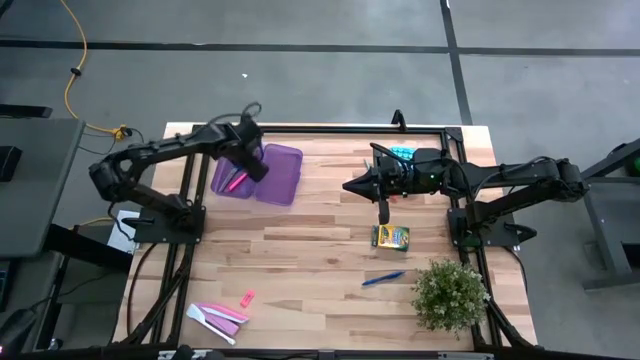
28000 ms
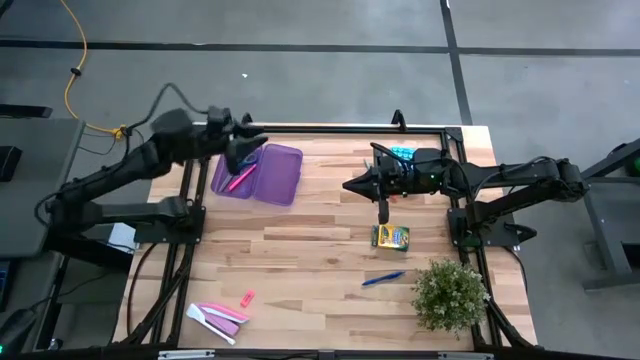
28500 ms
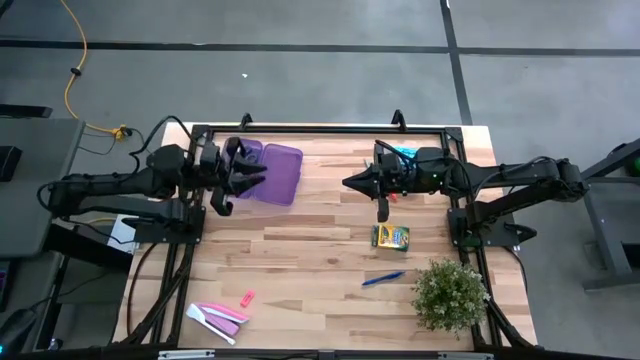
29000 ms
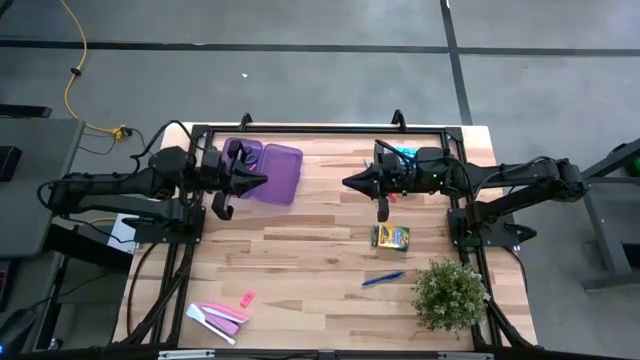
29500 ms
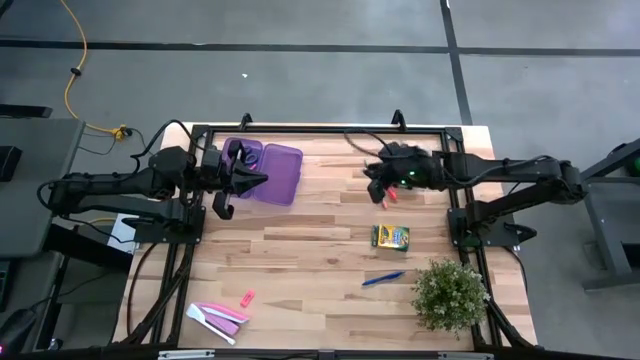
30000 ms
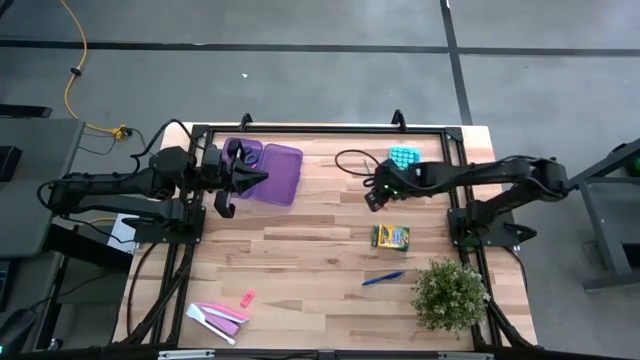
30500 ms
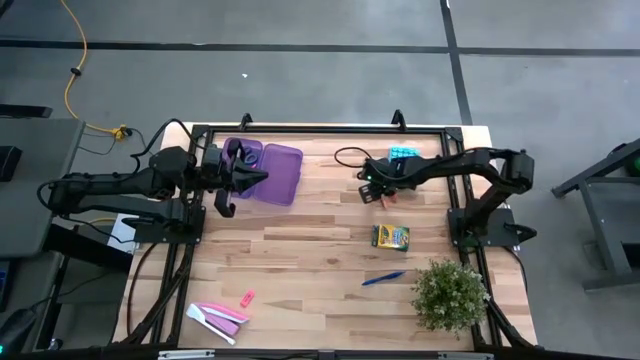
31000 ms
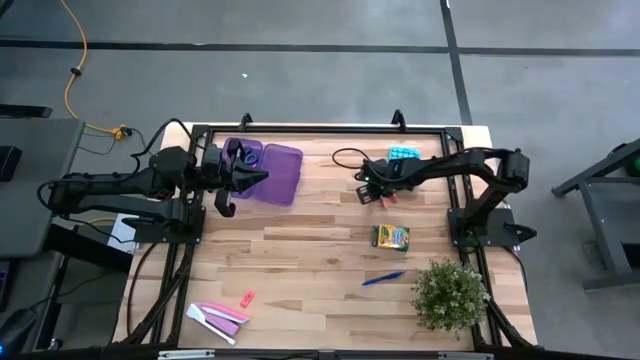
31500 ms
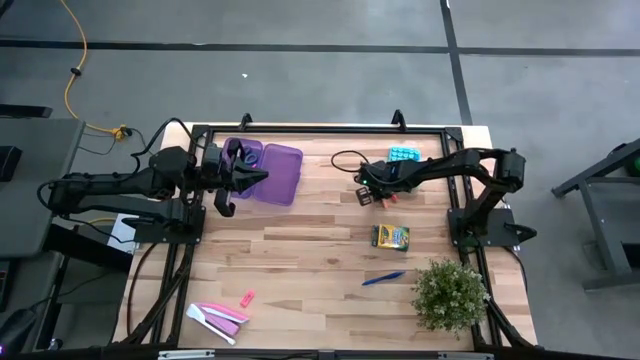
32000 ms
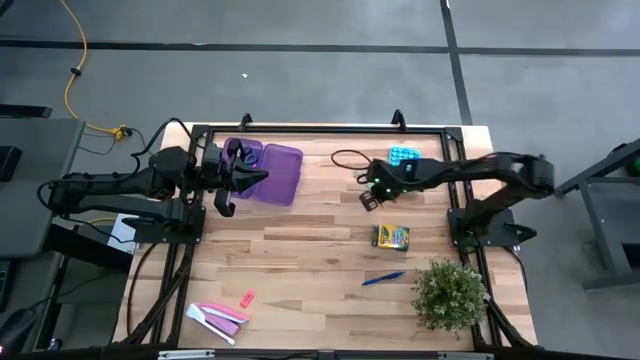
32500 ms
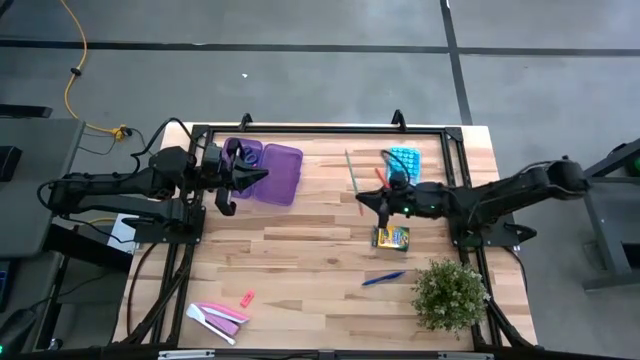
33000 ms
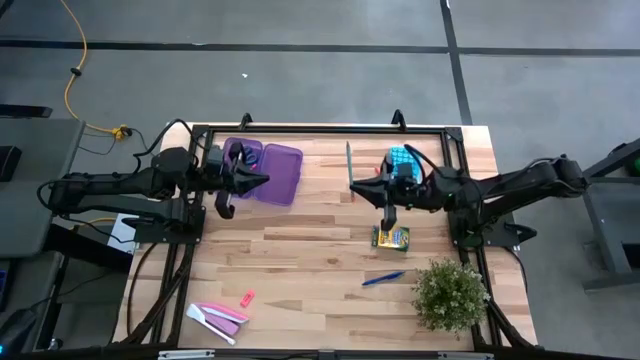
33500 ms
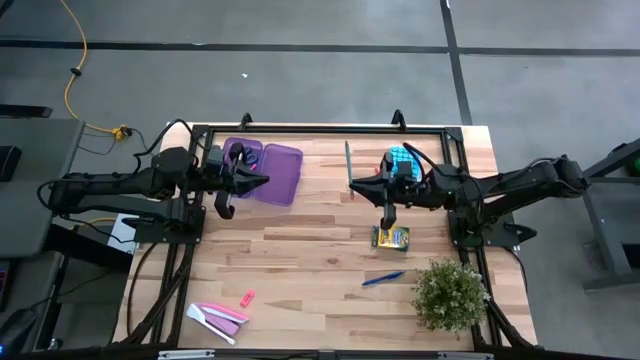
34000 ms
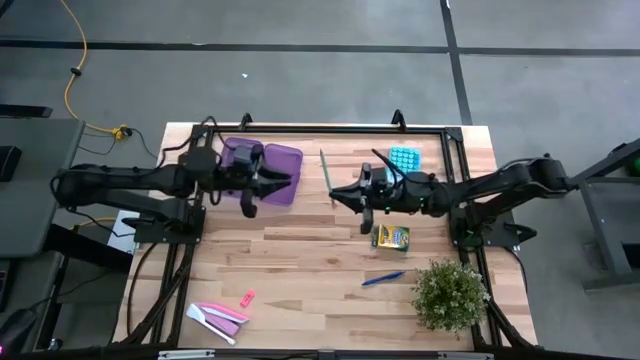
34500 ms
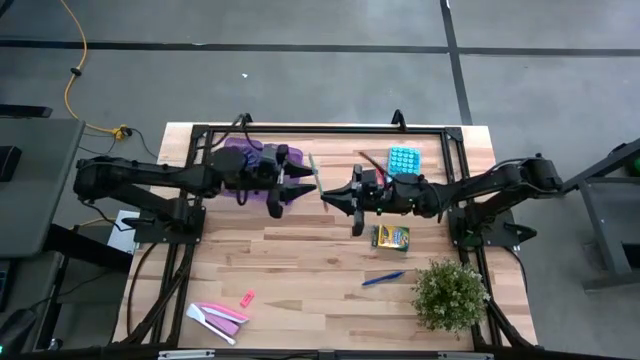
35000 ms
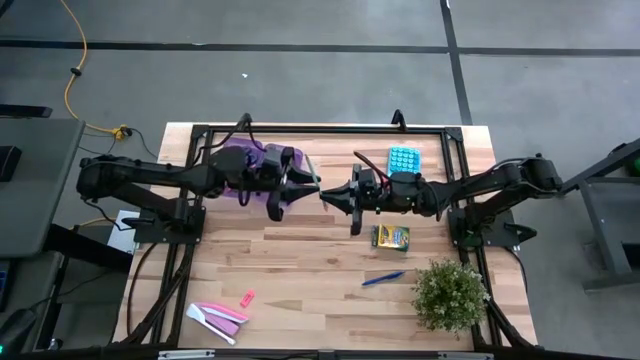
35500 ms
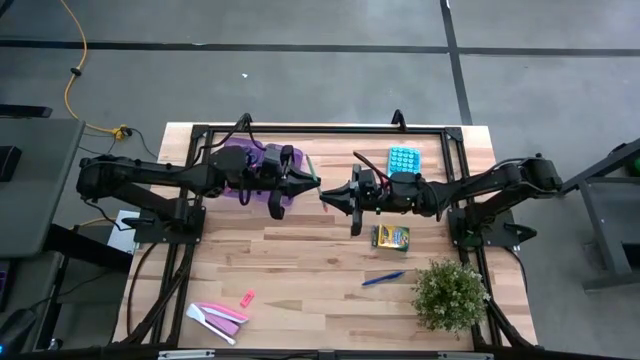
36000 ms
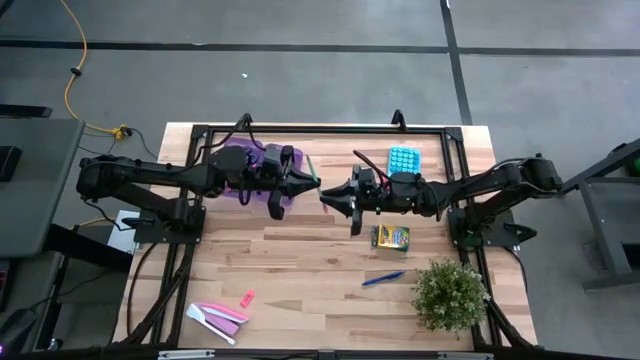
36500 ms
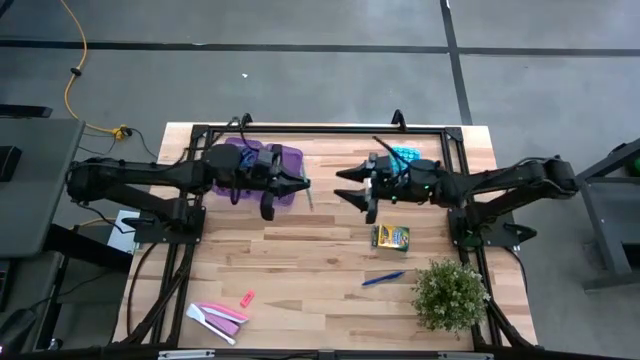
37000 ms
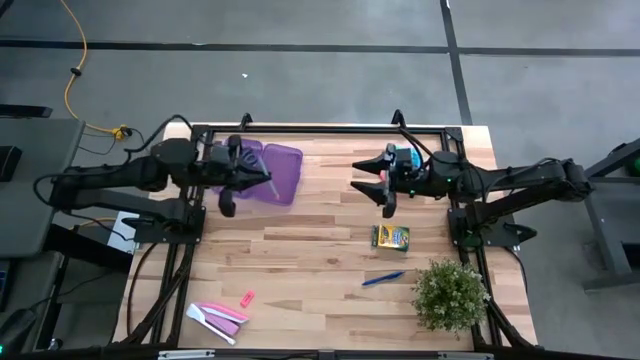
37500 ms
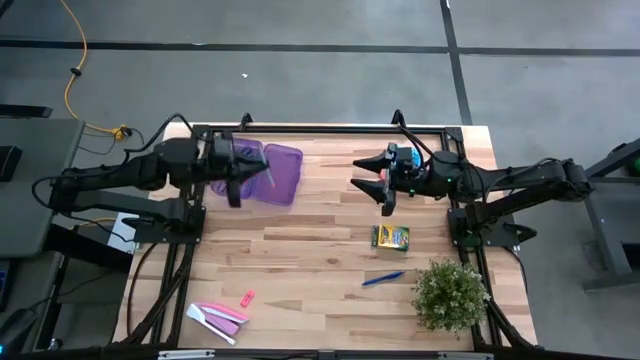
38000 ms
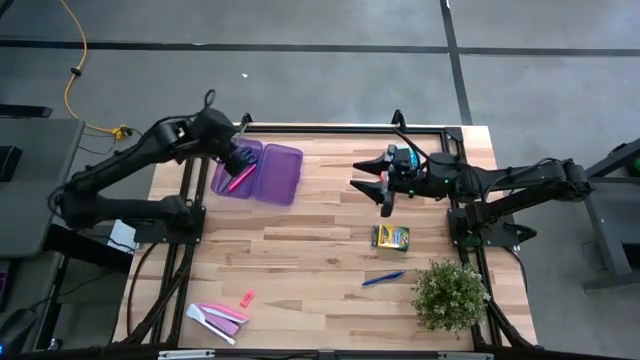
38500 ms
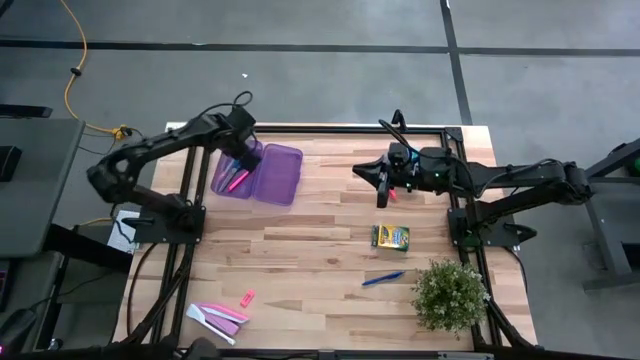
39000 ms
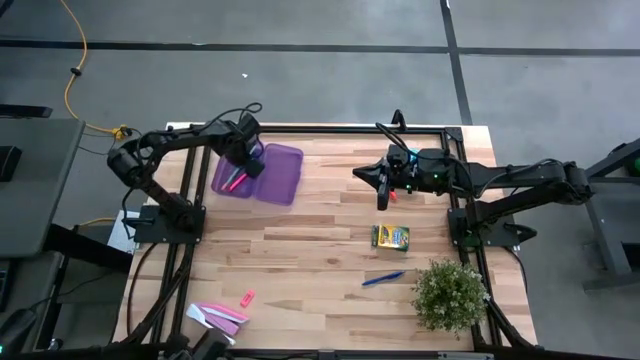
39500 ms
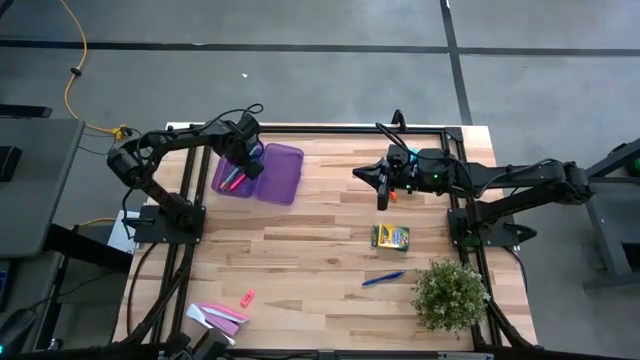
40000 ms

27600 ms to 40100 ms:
Task: Pack school essentials
Put the blue pencil with the eraser into the purple supply box

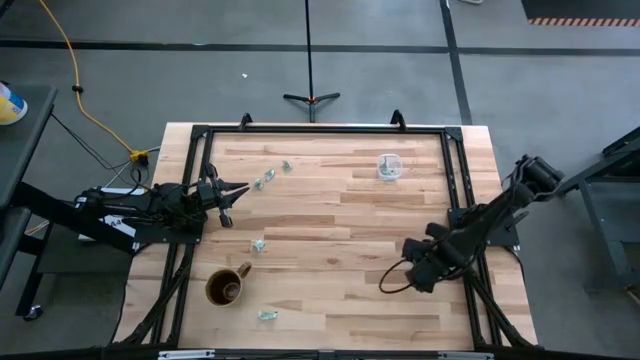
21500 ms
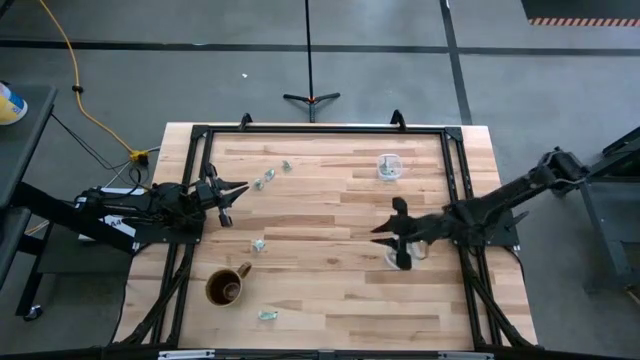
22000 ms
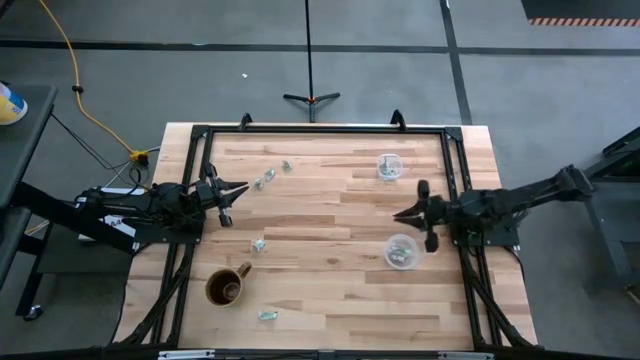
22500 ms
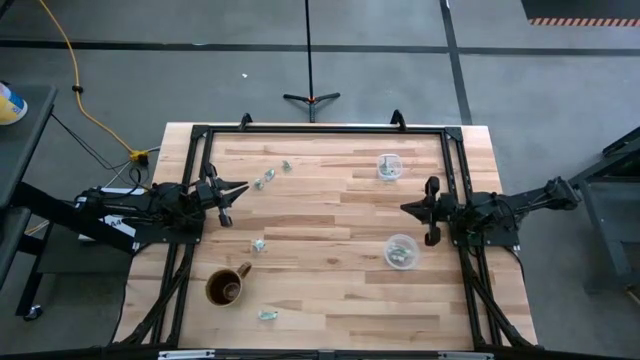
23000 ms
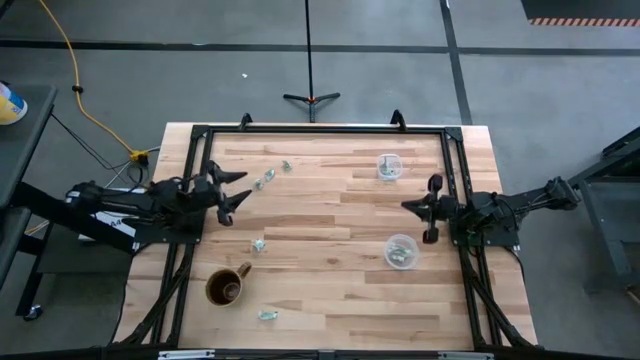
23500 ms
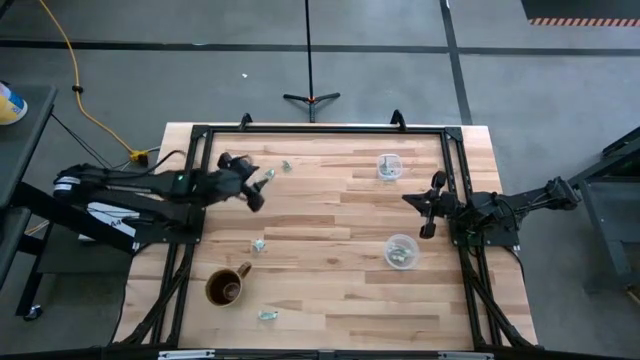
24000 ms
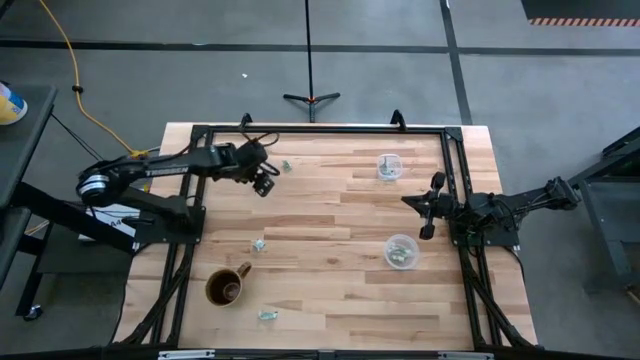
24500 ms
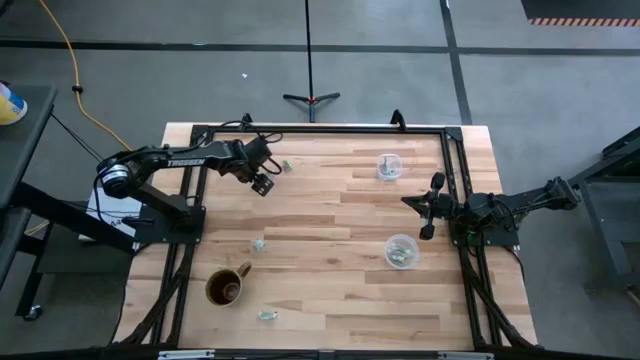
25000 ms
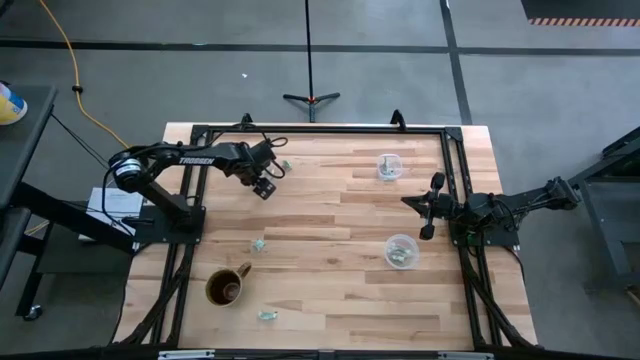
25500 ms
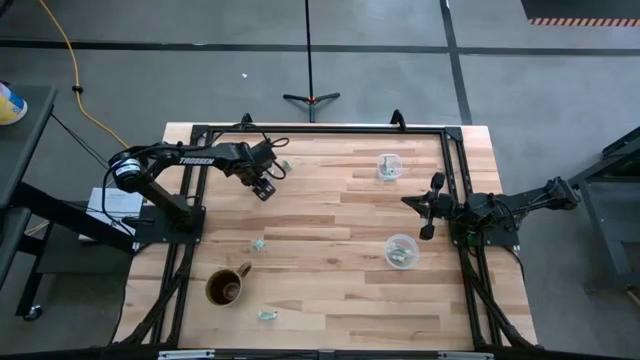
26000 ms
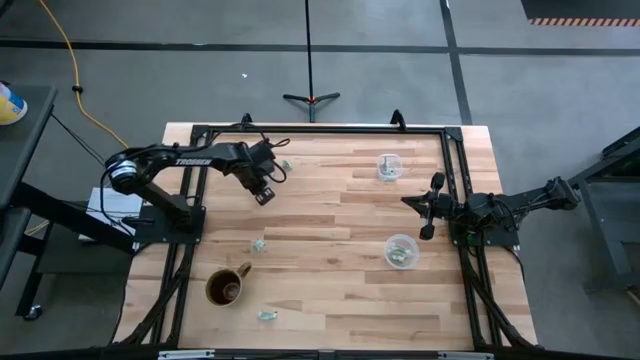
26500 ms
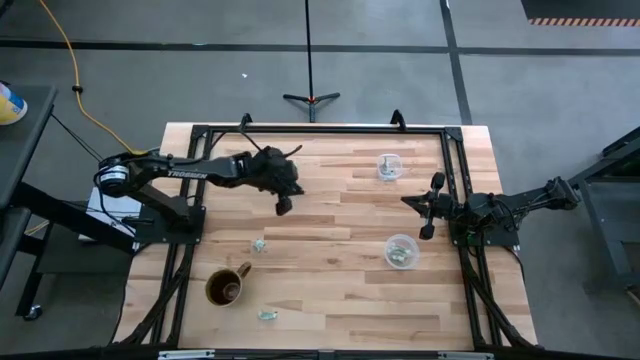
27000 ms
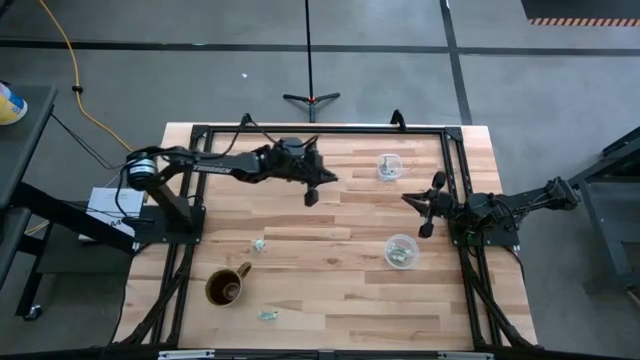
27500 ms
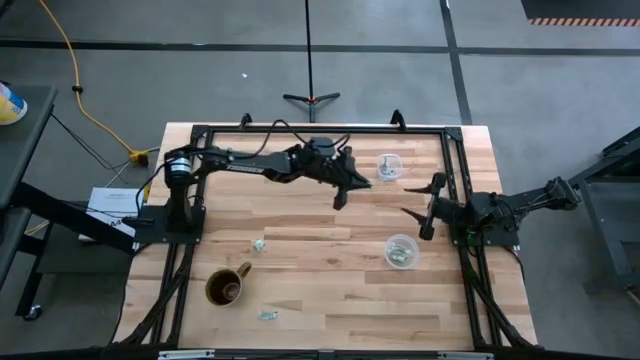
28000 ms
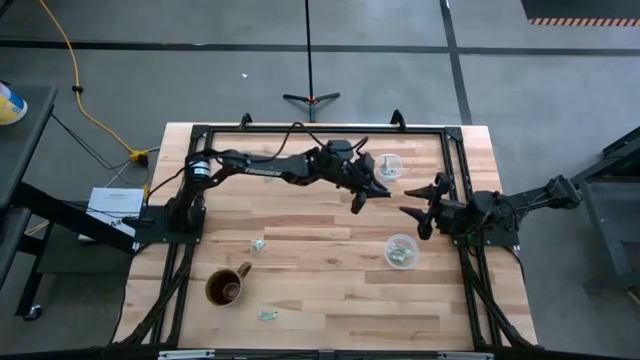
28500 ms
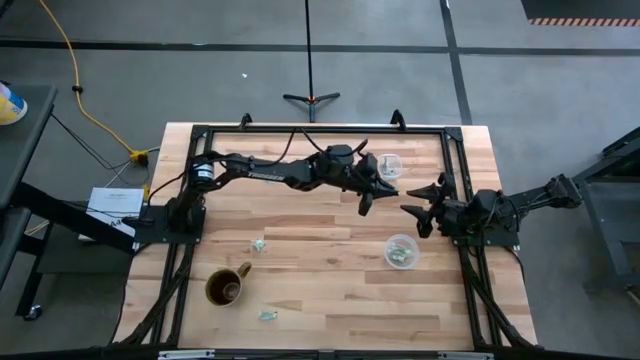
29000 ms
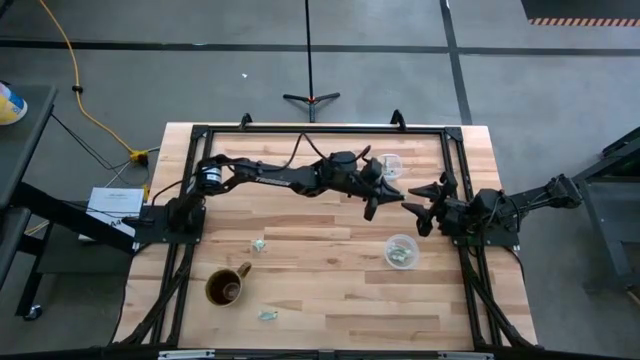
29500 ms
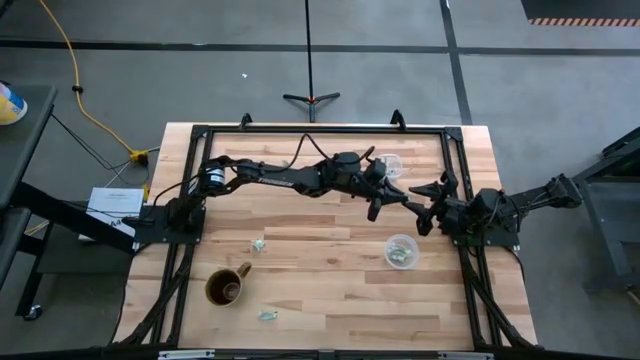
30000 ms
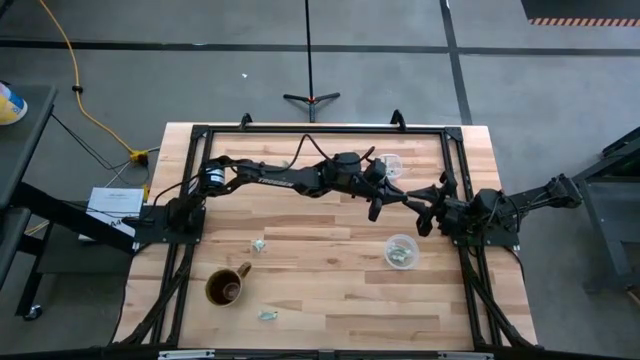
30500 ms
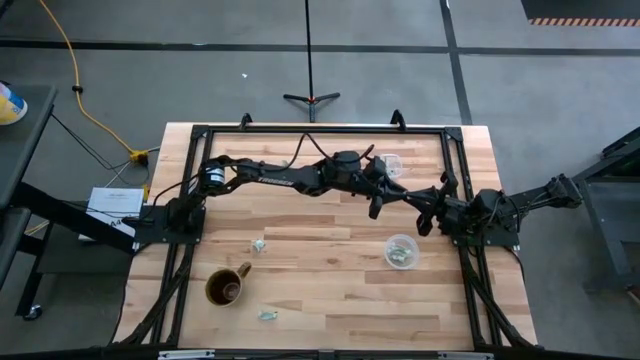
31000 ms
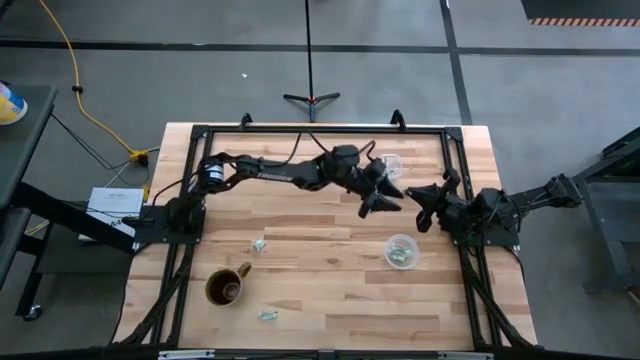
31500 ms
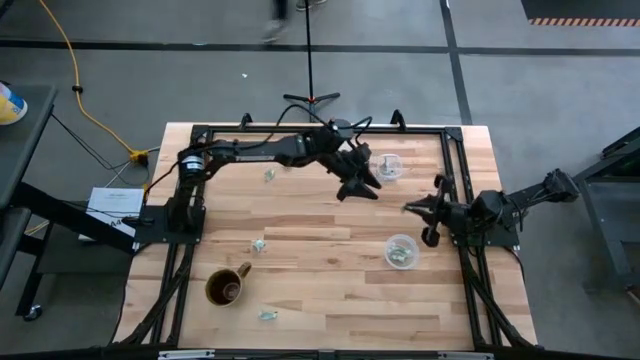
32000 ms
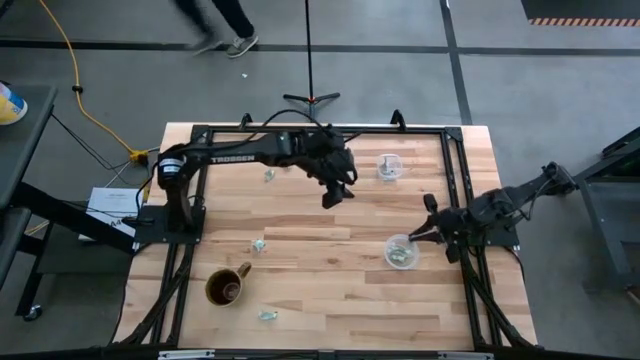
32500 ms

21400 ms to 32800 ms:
Task: Pick and place items into bin
Put the green stevia packet into the bottom transparent bin
